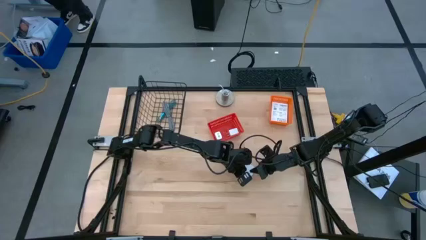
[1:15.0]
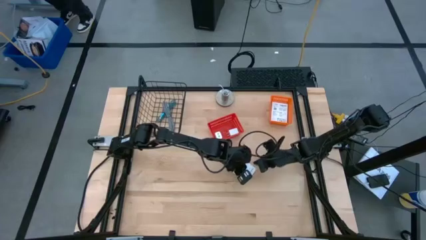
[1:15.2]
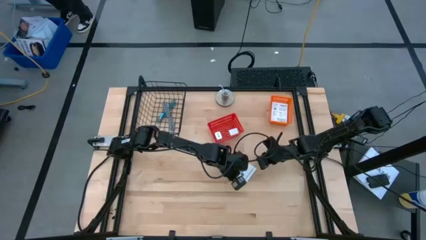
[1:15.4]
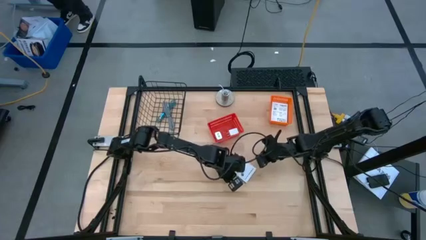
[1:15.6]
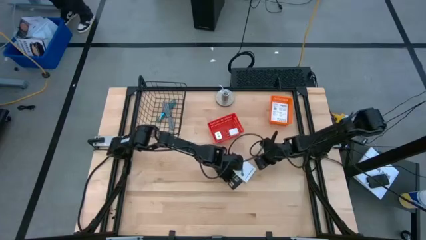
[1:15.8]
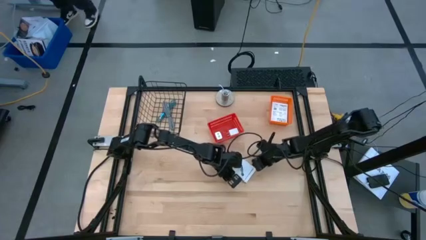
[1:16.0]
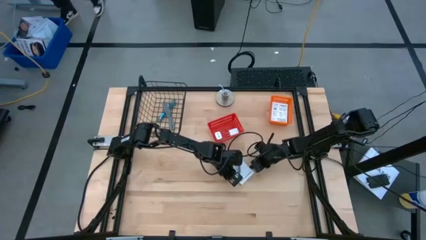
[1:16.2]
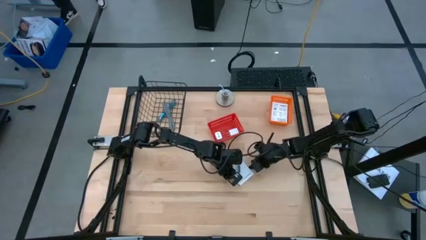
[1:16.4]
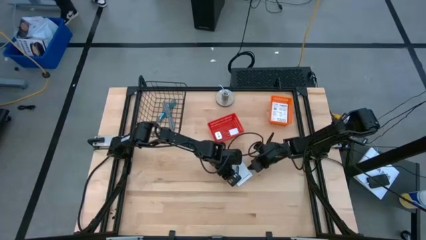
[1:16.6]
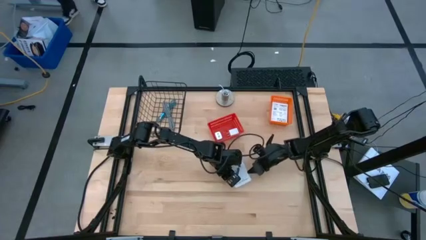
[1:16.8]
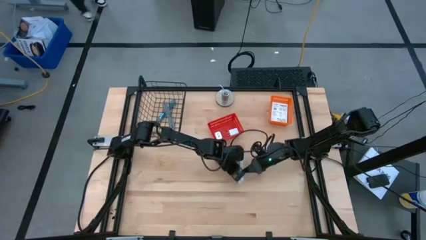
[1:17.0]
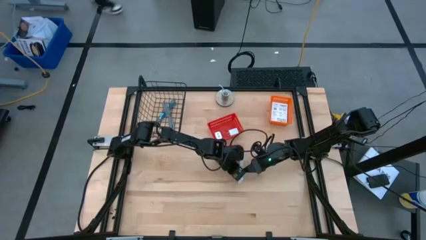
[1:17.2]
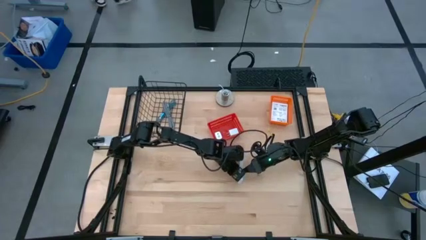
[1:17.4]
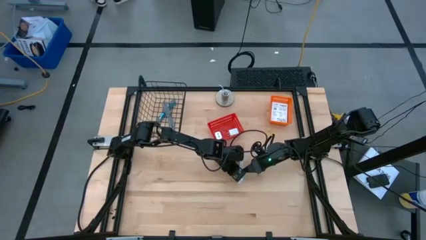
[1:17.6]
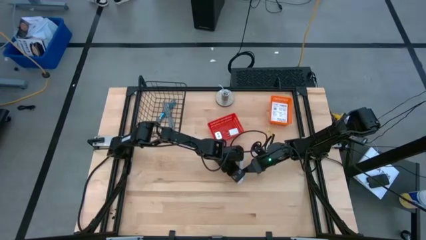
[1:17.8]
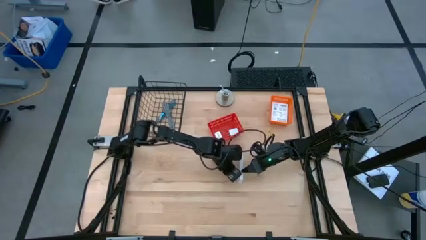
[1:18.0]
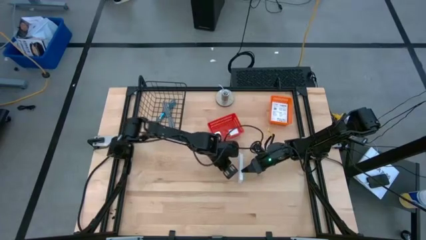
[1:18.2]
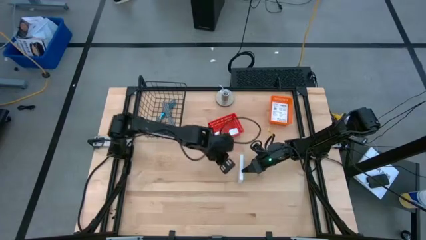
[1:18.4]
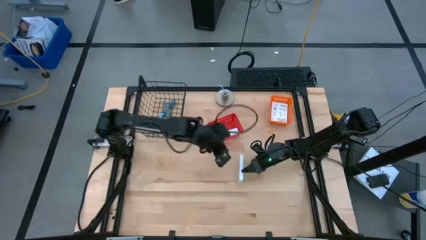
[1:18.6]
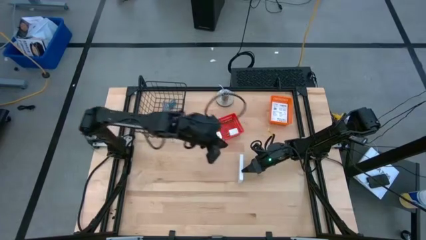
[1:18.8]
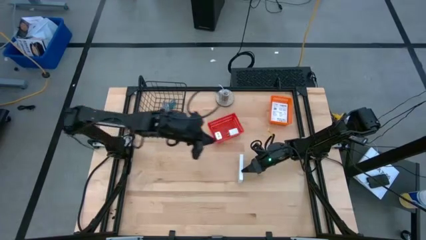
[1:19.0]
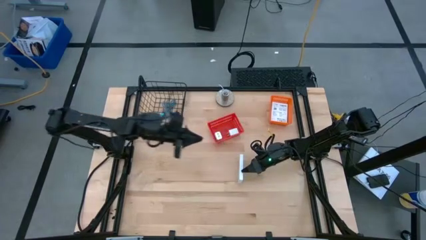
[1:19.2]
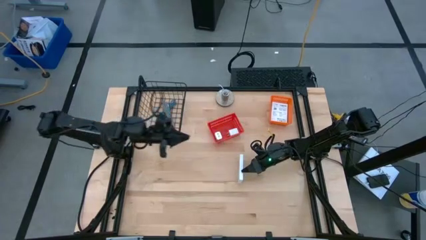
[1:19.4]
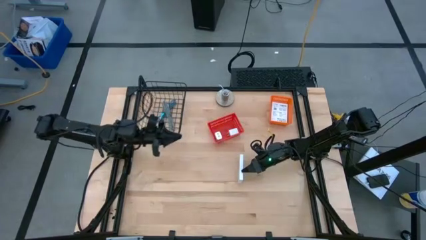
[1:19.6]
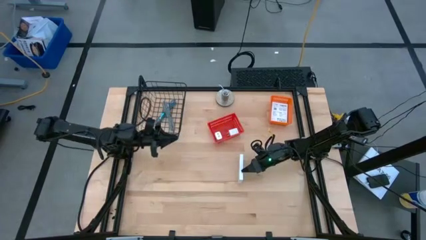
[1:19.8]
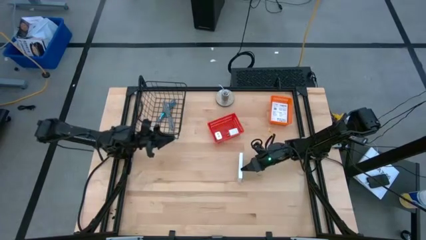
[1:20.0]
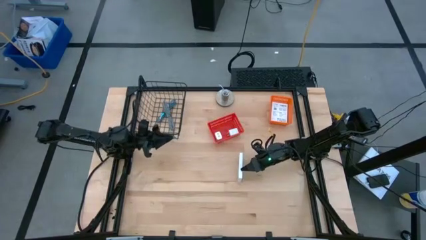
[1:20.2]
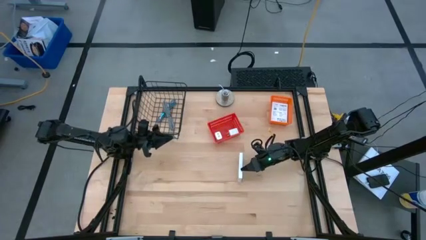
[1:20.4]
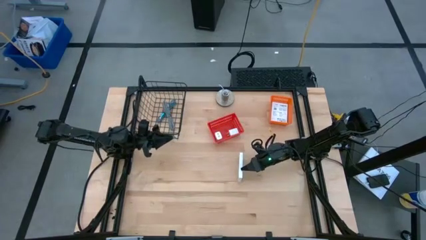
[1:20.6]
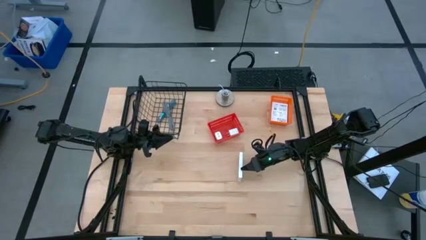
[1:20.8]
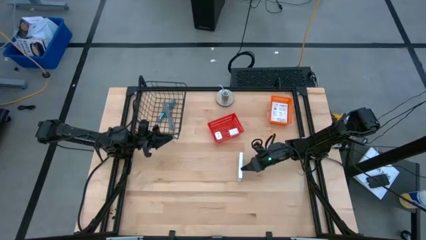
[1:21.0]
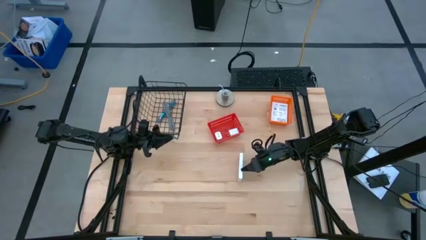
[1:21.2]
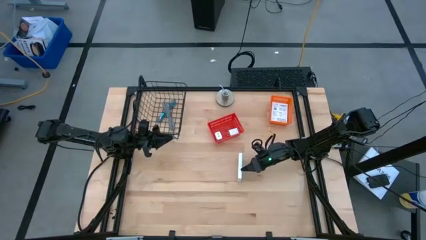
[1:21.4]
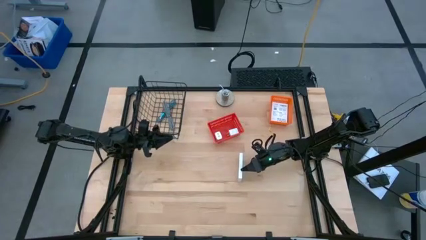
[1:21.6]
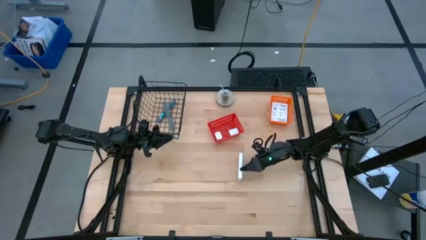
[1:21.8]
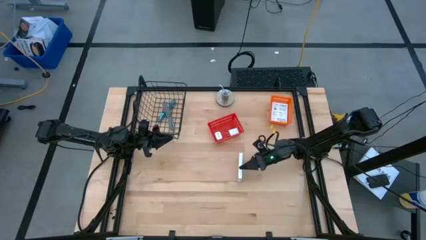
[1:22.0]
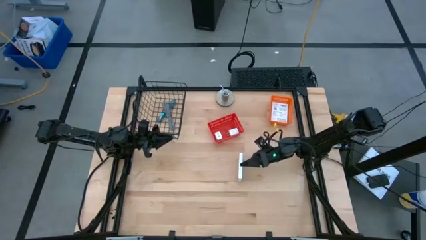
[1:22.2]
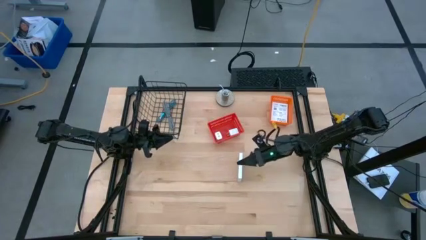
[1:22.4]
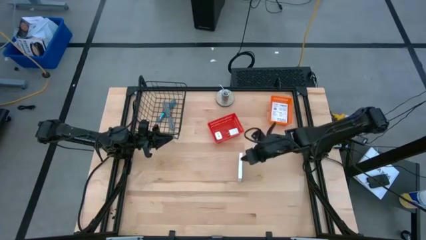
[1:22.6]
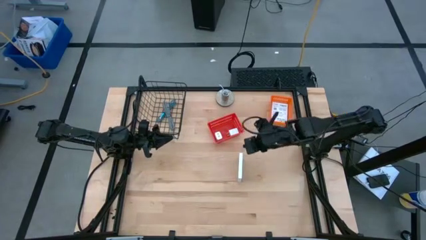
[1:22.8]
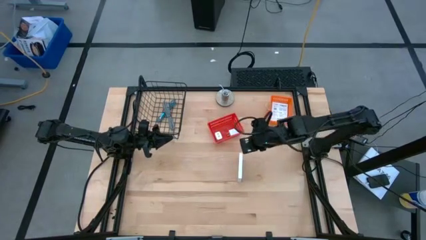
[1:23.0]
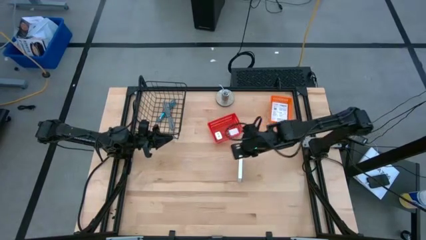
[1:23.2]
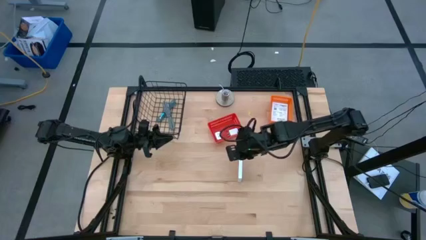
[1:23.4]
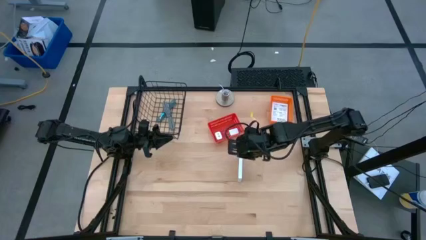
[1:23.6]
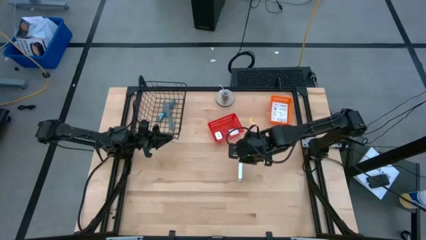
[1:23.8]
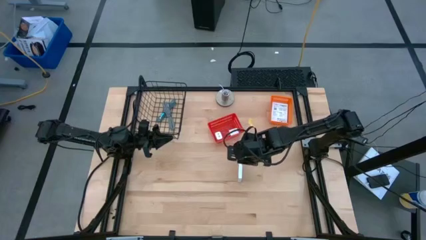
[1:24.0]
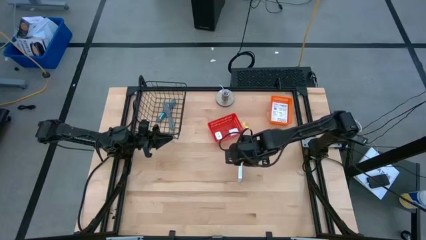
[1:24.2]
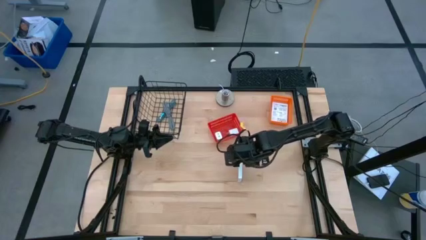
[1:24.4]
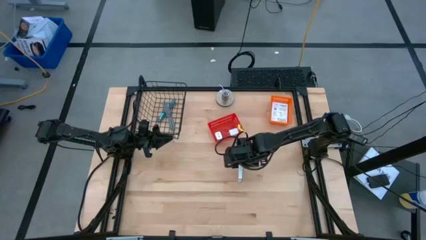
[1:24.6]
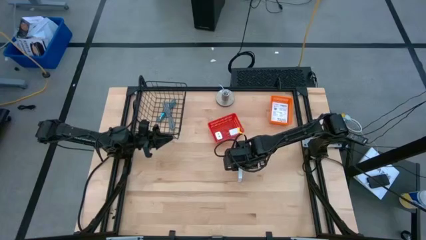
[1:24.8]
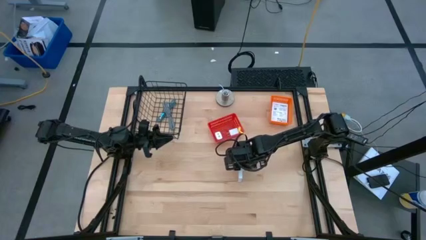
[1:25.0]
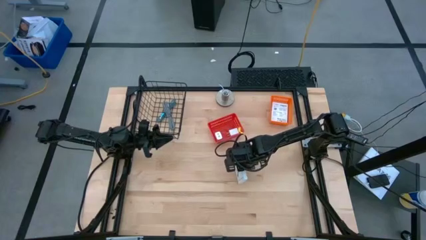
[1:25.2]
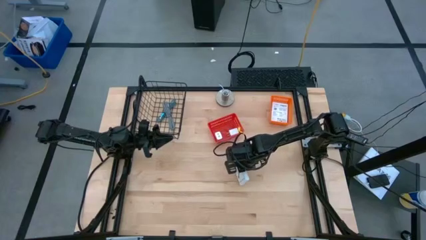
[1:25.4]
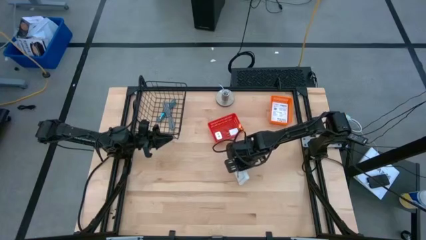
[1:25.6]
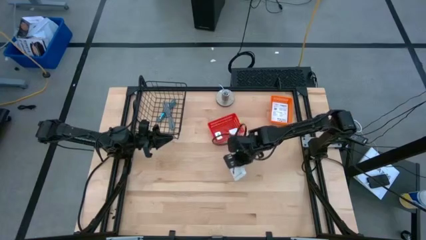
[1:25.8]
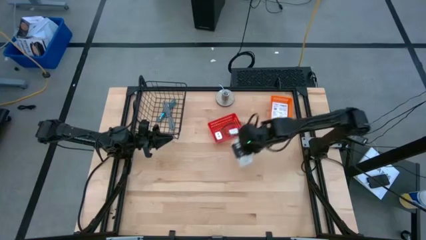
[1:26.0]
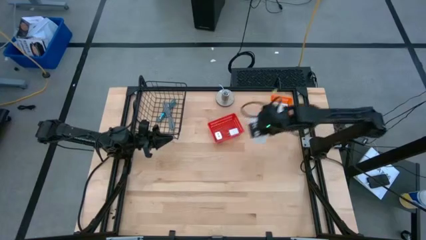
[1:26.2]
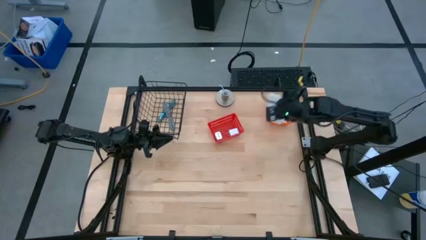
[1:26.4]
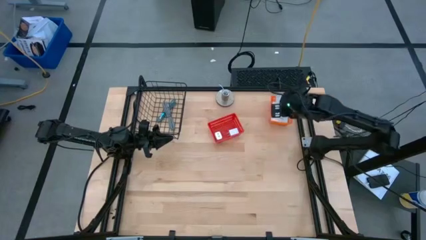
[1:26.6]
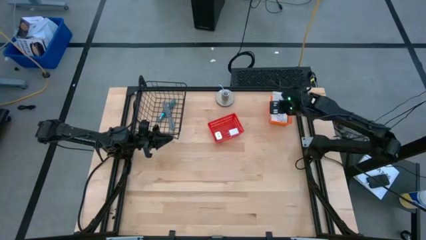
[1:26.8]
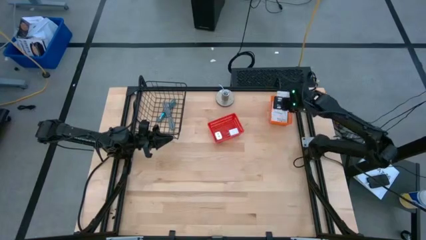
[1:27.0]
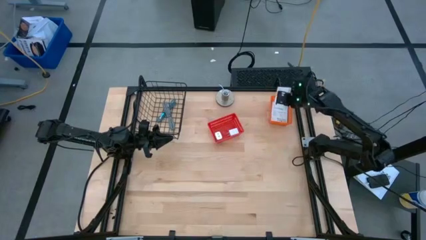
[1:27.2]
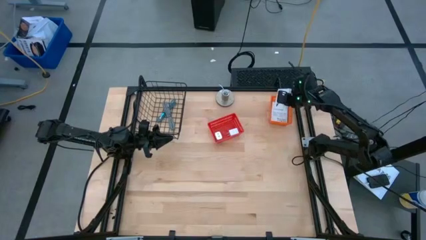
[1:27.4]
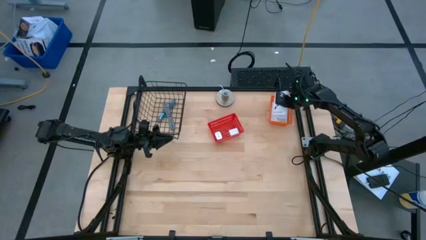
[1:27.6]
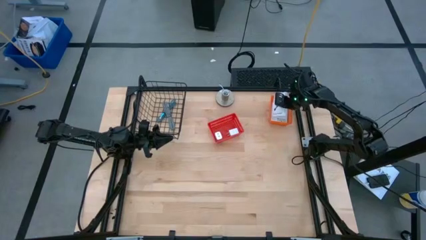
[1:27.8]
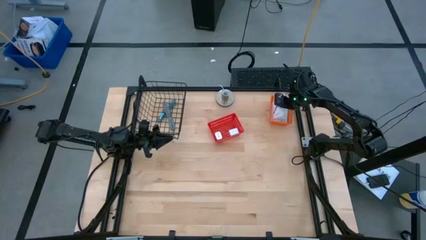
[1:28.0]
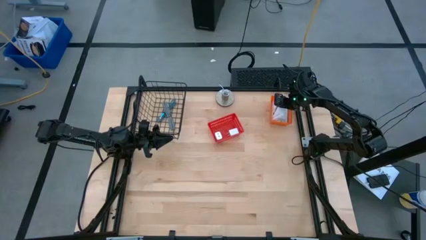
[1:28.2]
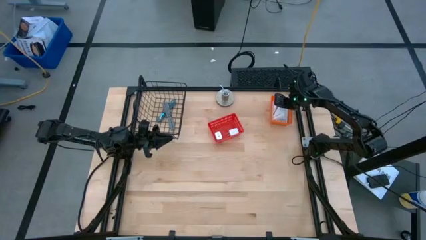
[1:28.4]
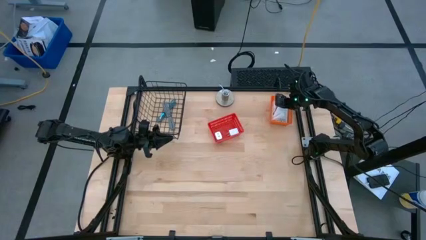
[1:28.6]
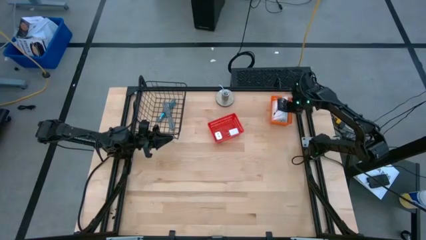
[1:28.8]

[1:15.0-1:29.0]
Task: Pick and place items into bin
Put the white card reader box into the orange bin

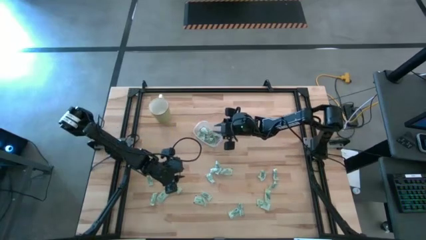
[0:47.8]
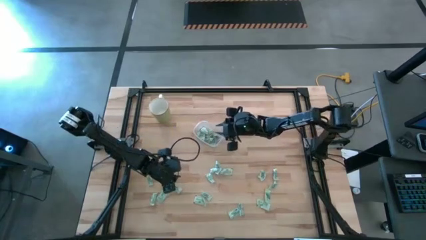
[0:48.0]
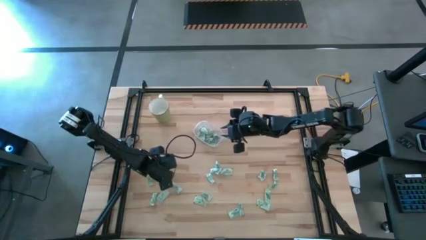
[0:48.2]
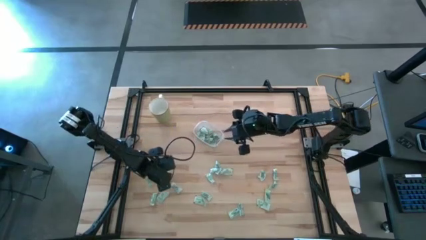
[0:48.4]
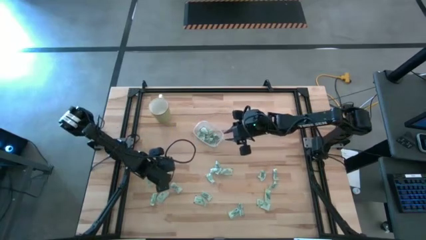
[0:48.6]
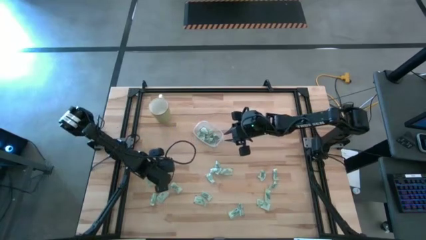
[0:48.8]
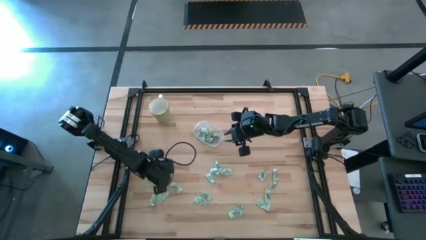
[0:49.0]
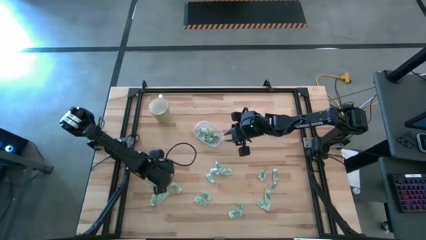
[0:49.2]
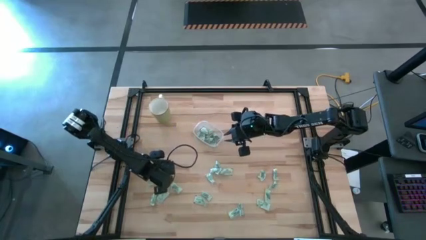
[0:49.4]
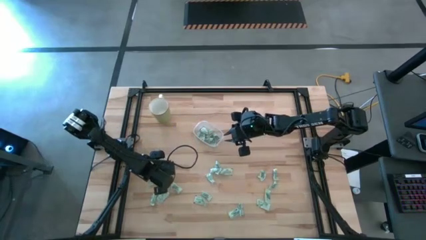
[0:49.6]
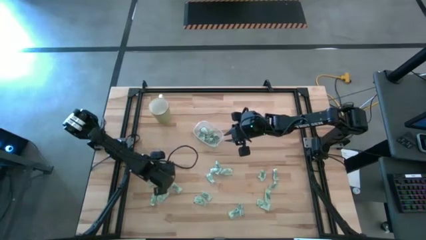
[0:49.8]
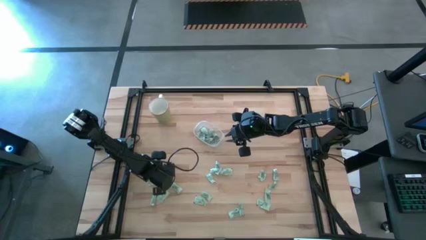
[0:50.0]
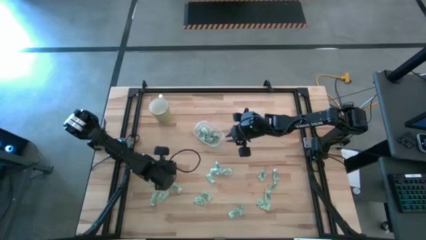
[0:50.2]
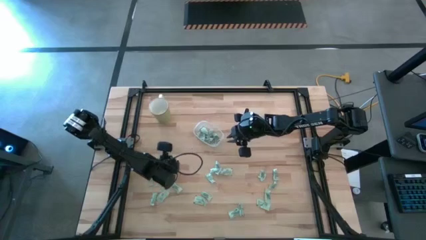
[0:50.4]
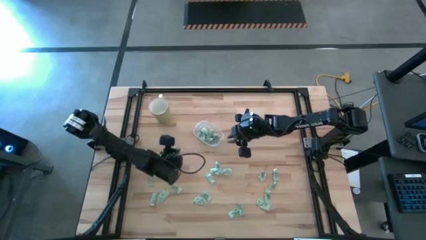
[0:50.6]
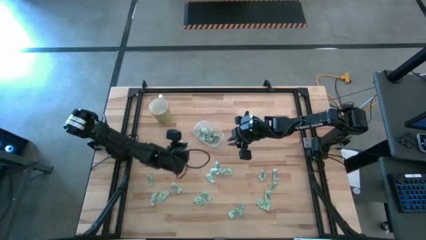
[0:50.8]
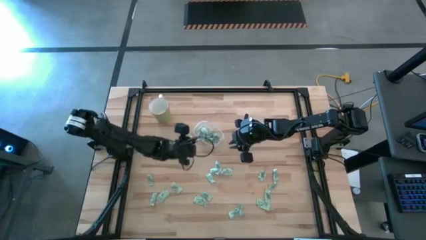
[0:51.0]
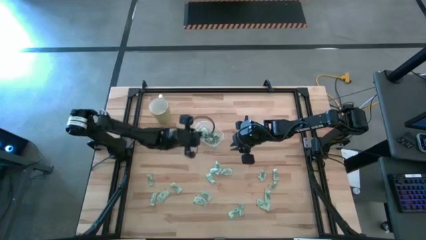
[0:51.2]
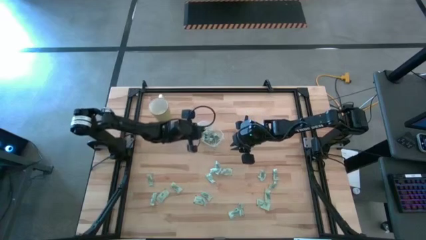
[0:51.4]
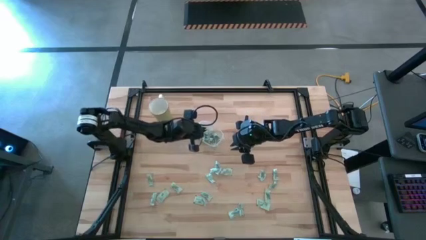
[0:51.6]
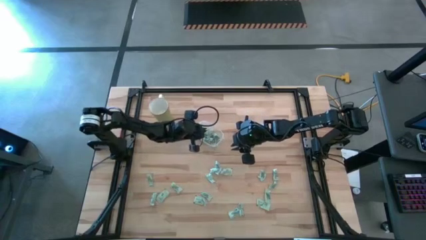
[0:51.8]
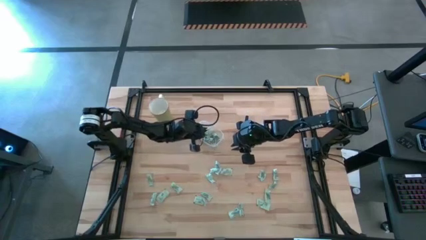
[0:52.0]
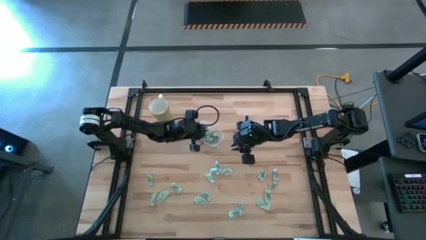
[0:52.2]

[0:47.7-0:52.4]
Task: Pick and place Stevia / Truvia into bins
Put the stevia packet into the transparent container
